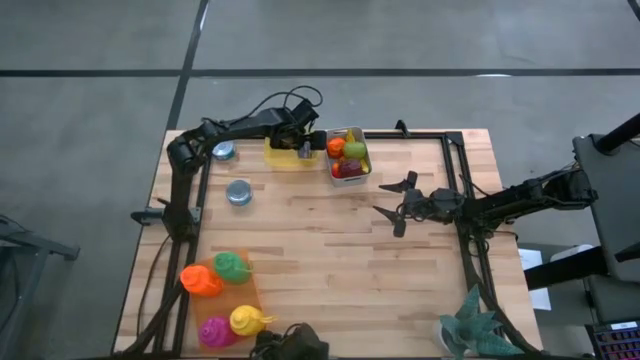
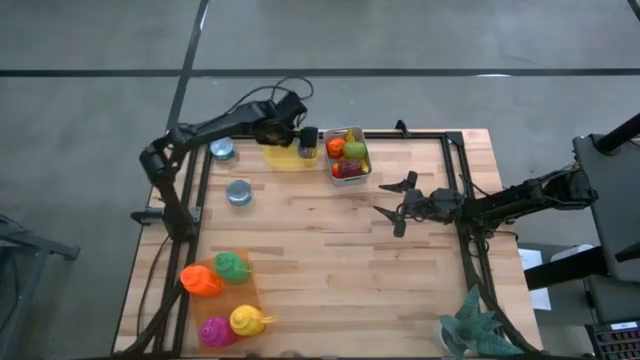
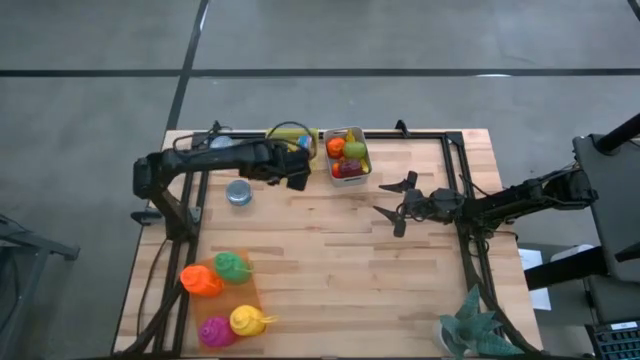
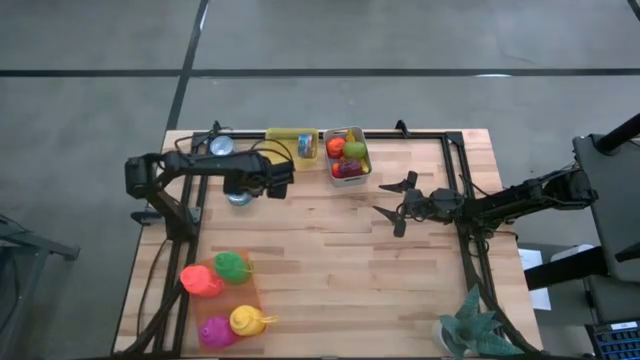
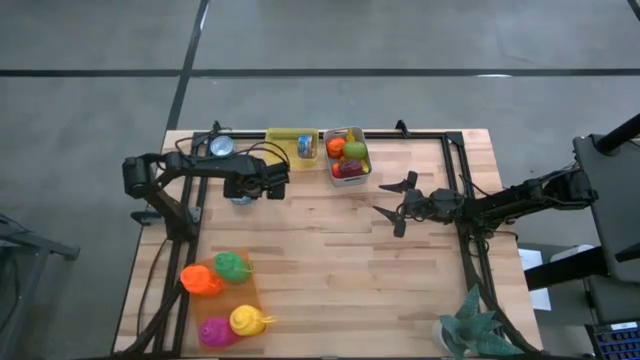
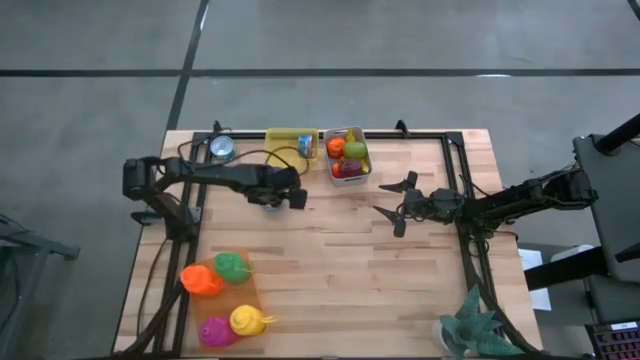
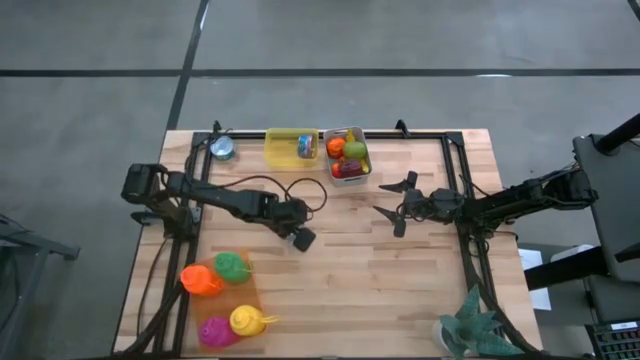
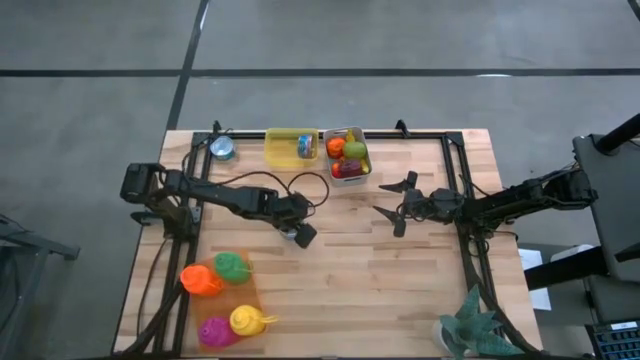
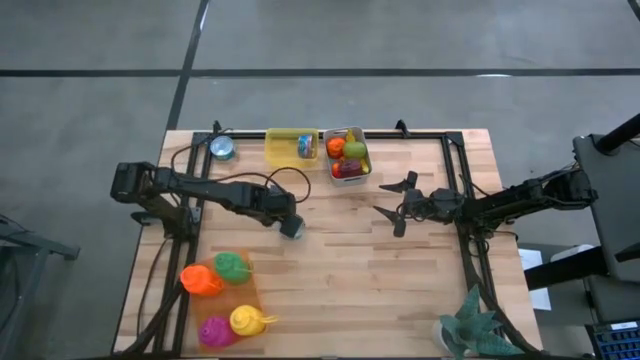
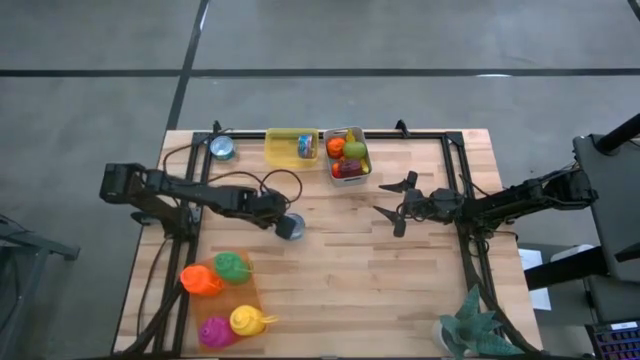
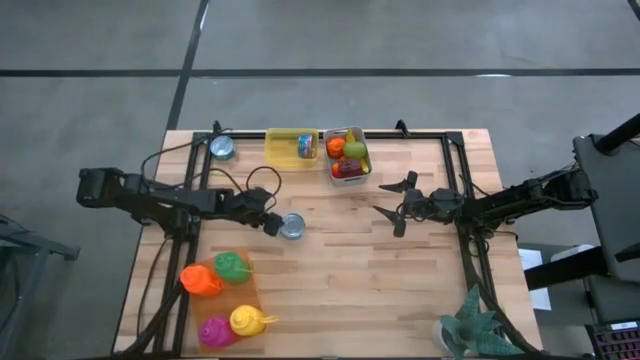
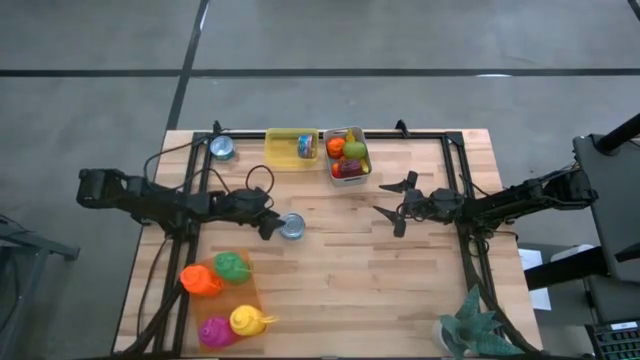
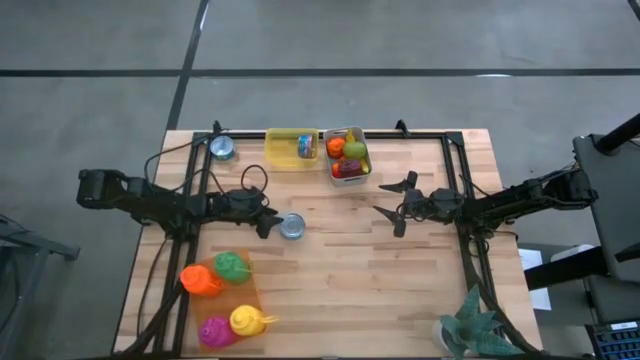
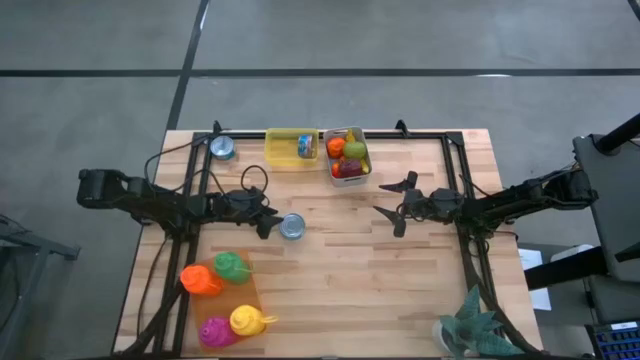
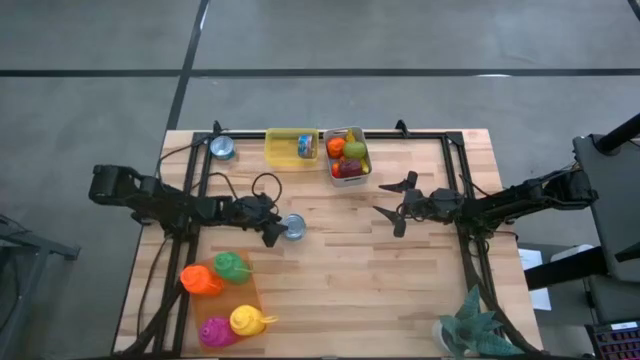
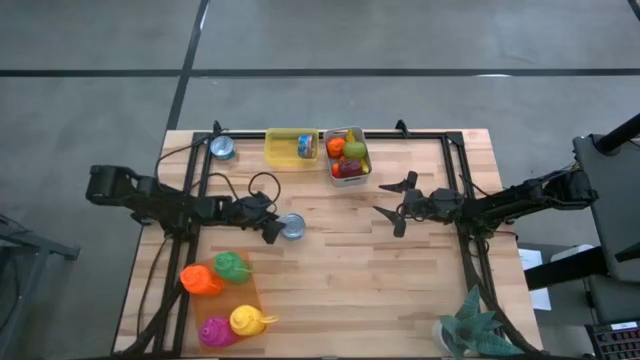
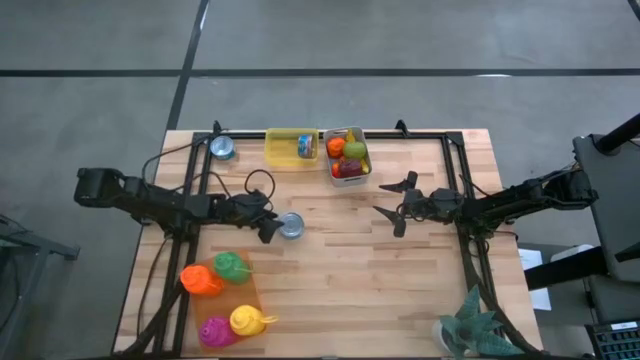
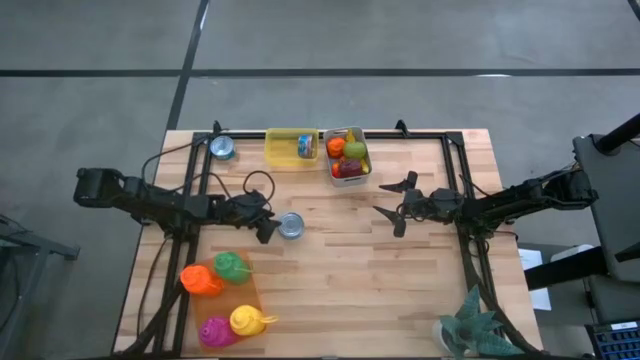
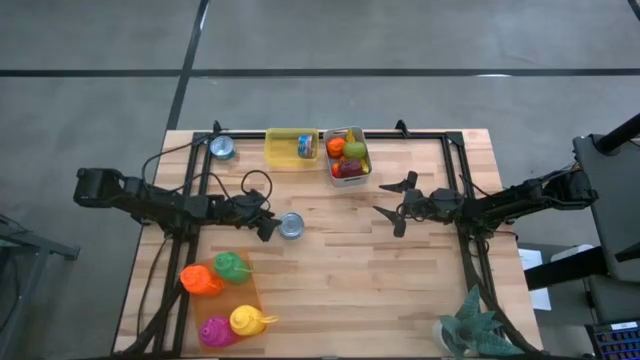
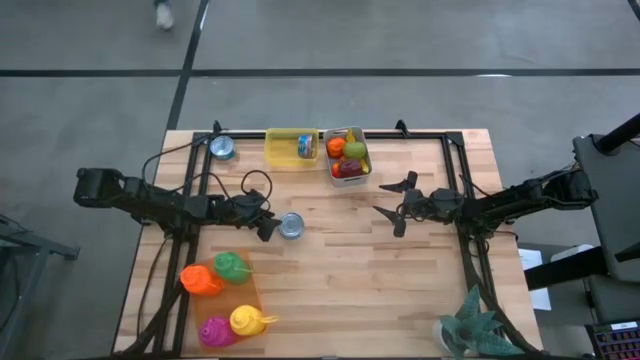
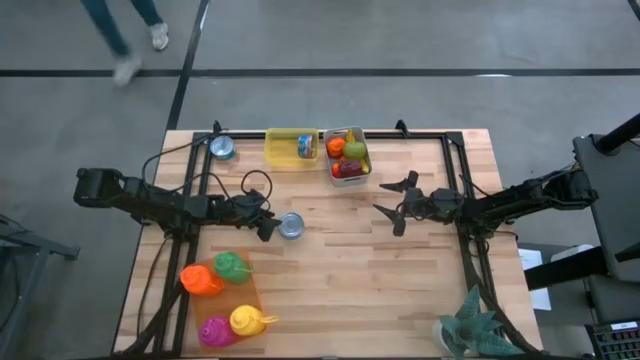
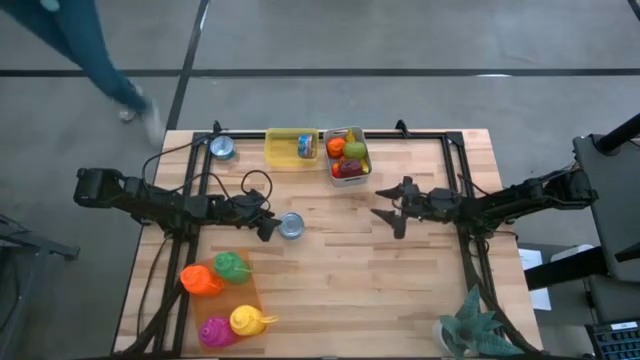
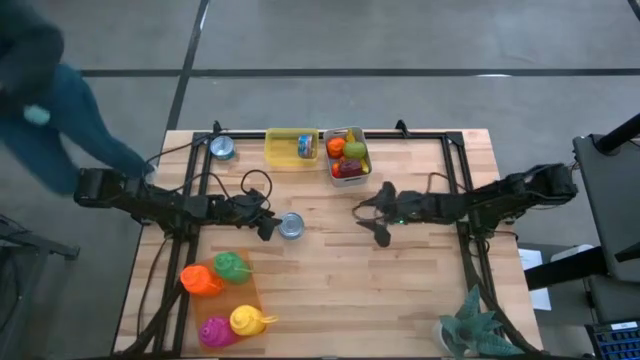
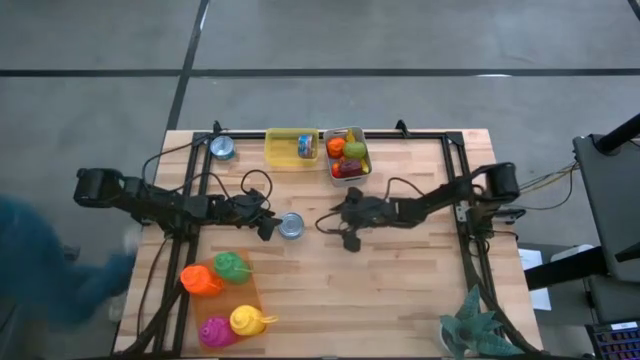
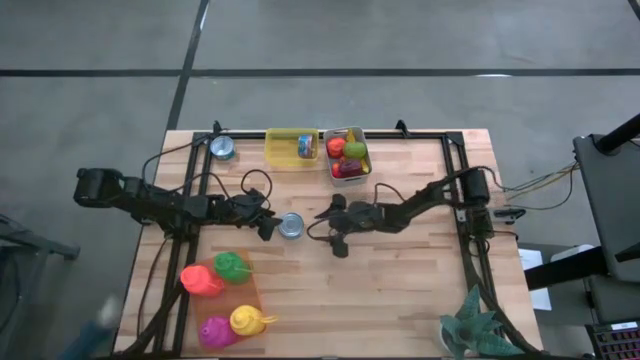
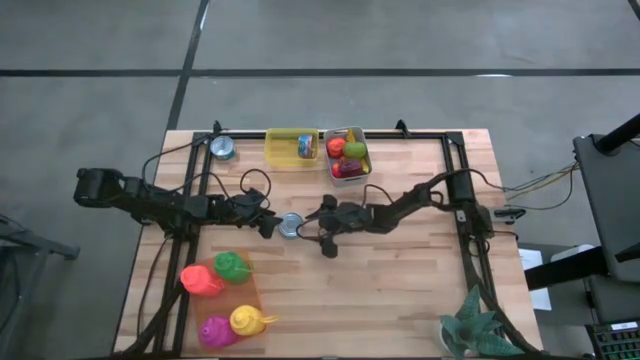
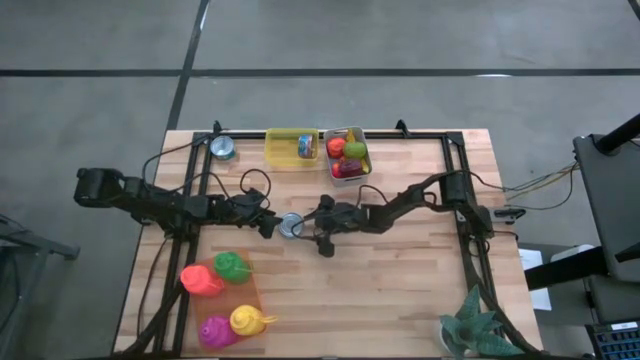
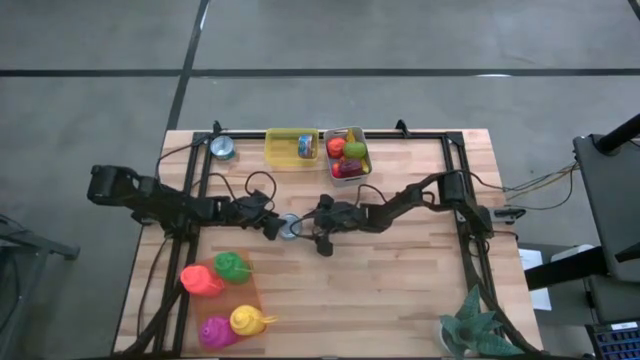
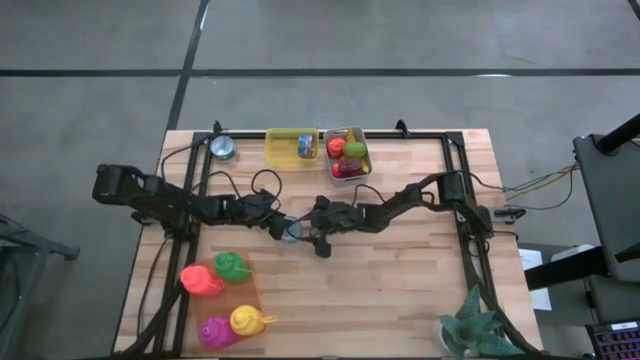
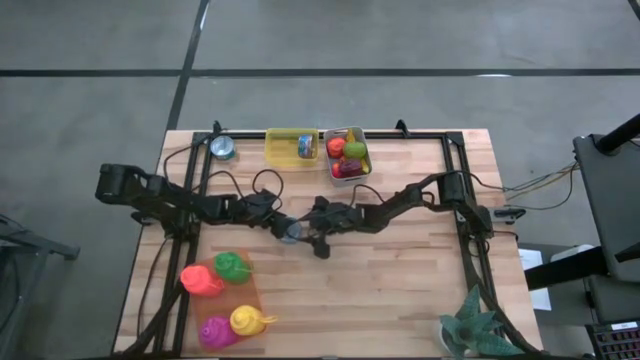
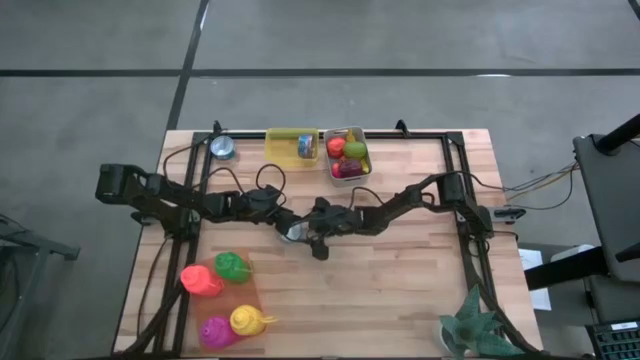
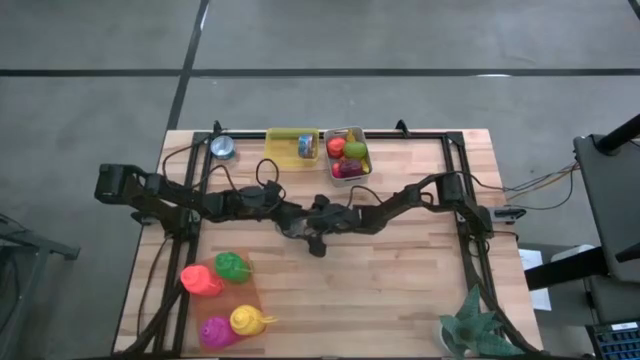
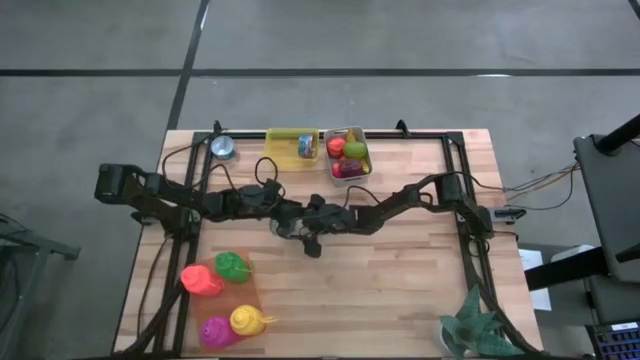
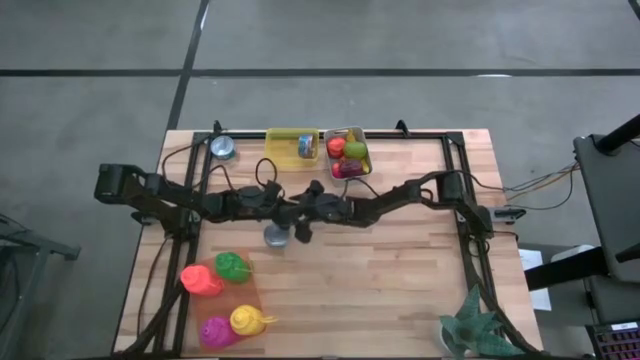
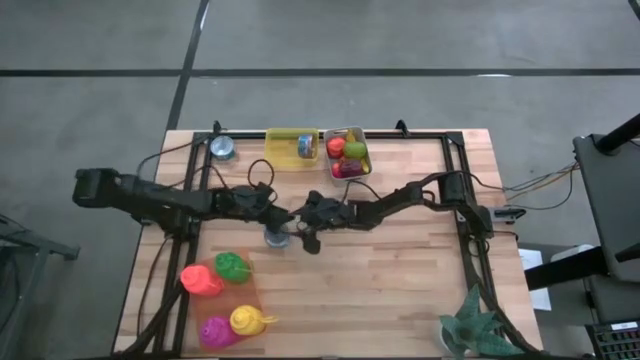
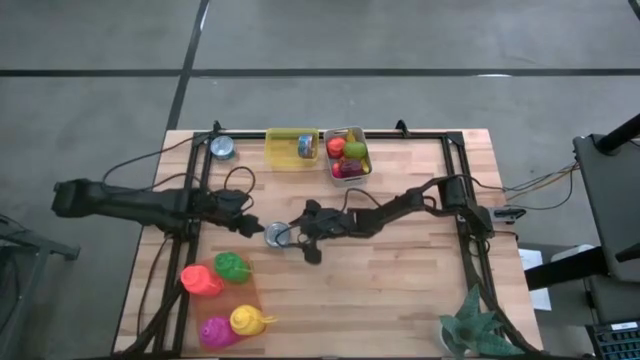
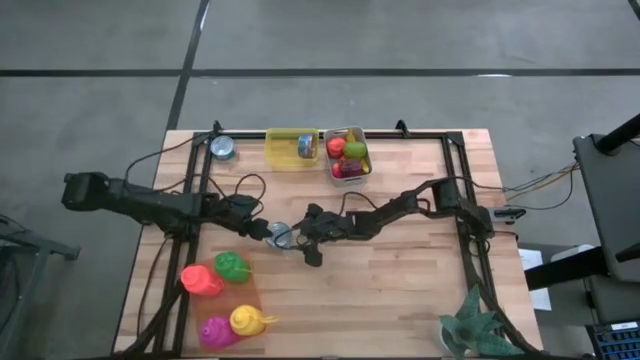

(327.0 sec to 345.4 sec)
Task: Pick & Place Food Item
Put the blue tuna can into the yellow bin
